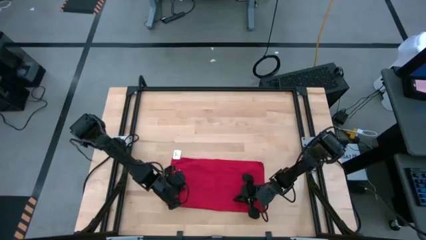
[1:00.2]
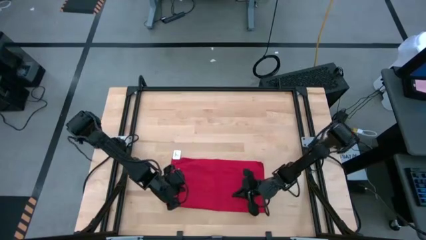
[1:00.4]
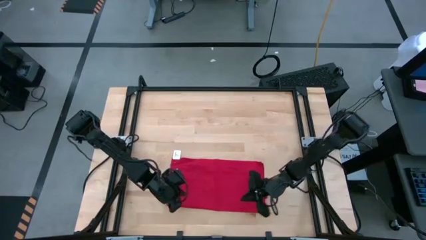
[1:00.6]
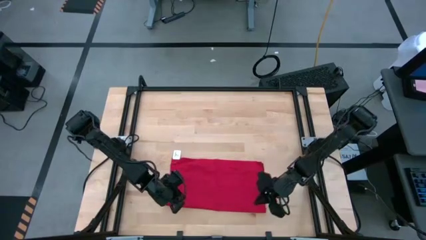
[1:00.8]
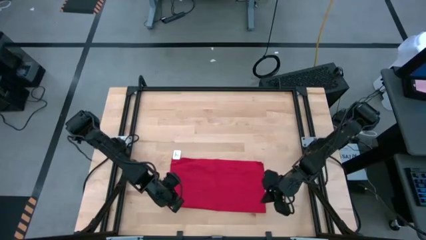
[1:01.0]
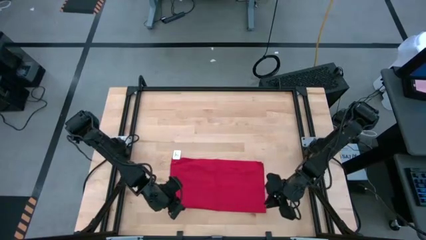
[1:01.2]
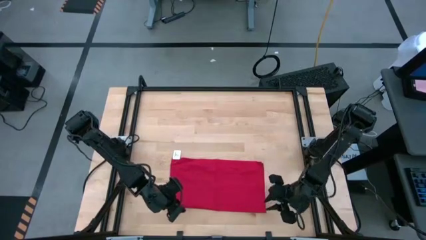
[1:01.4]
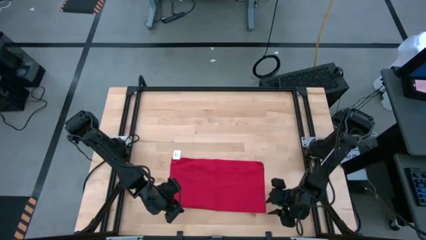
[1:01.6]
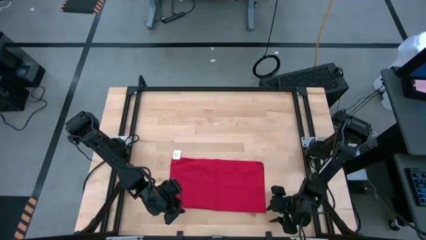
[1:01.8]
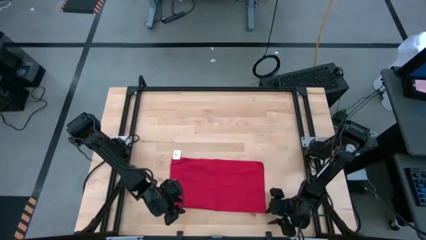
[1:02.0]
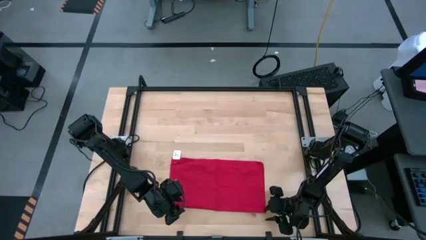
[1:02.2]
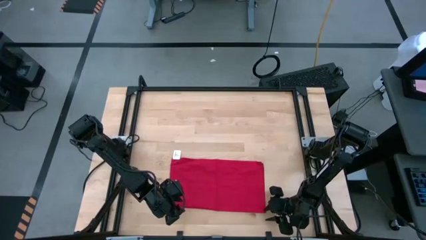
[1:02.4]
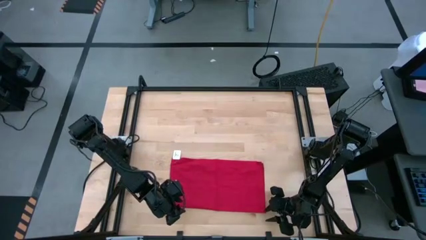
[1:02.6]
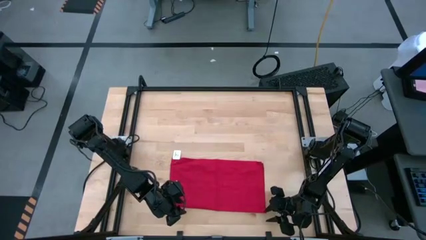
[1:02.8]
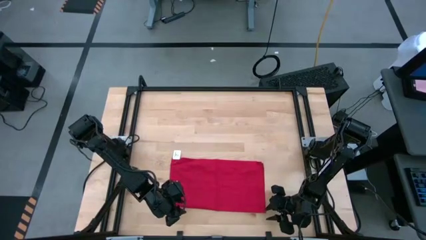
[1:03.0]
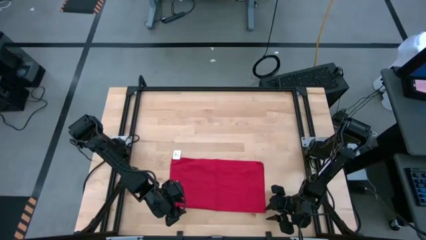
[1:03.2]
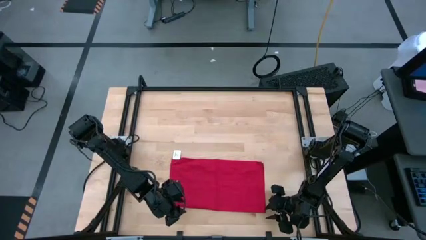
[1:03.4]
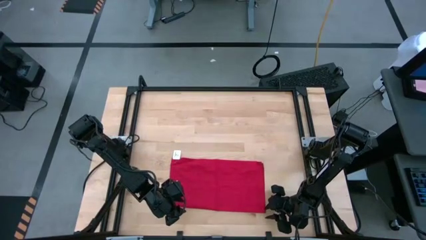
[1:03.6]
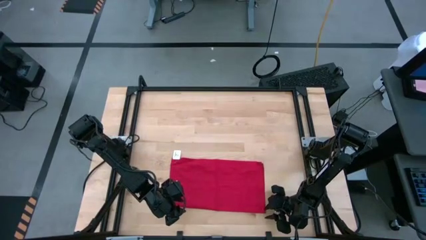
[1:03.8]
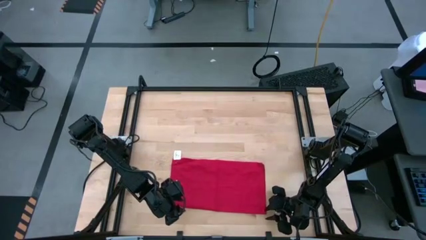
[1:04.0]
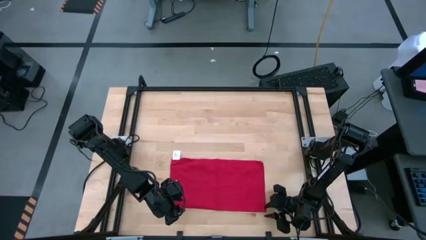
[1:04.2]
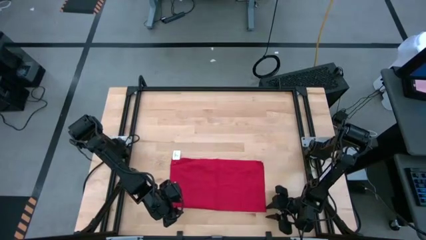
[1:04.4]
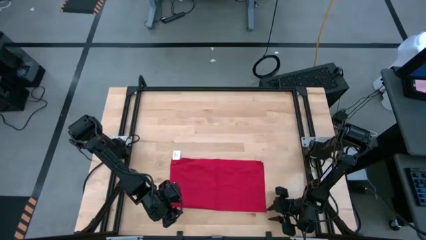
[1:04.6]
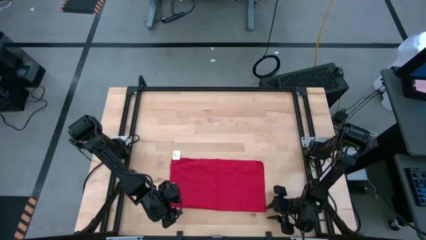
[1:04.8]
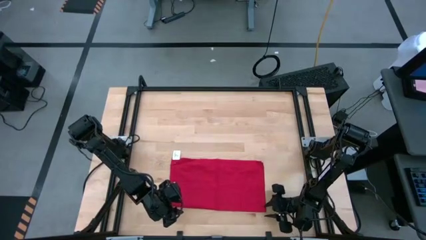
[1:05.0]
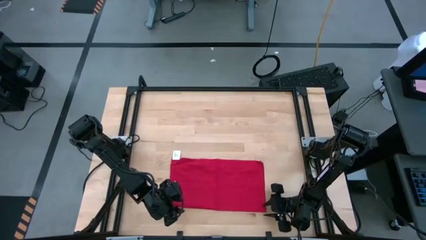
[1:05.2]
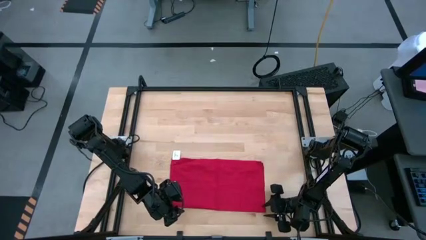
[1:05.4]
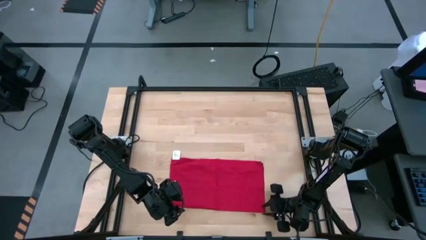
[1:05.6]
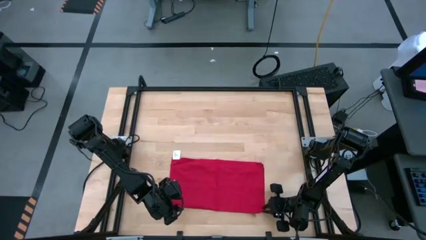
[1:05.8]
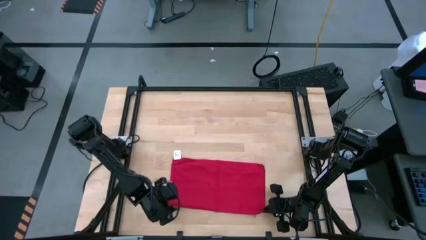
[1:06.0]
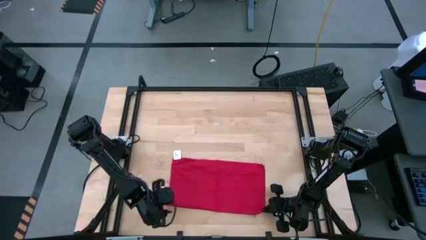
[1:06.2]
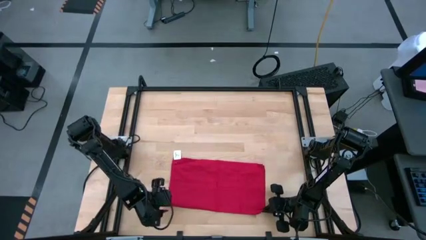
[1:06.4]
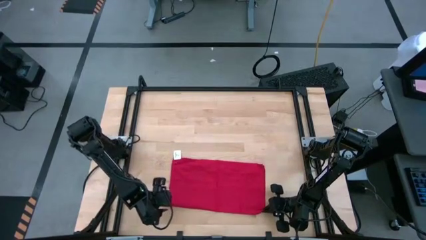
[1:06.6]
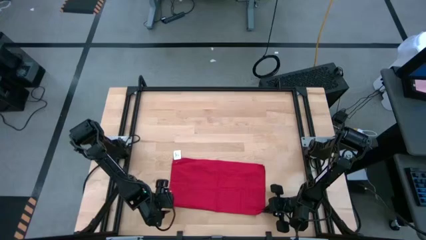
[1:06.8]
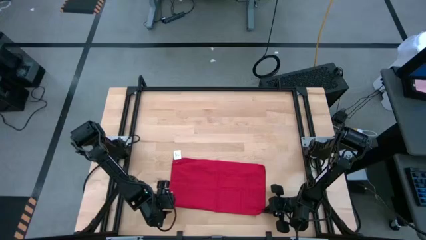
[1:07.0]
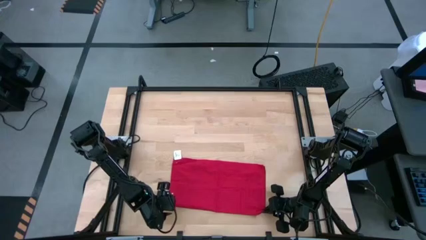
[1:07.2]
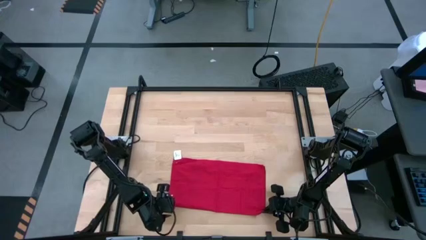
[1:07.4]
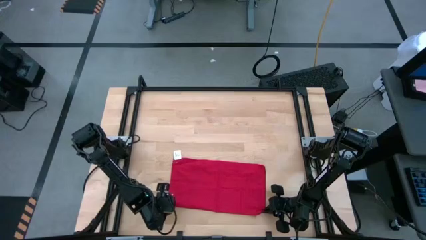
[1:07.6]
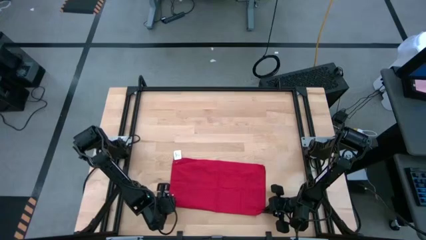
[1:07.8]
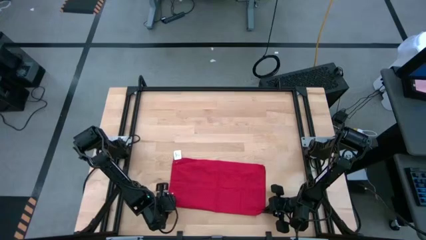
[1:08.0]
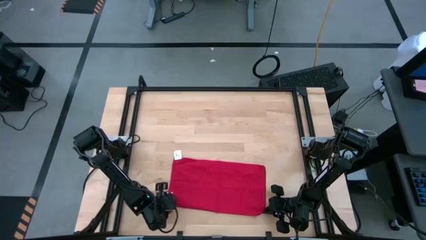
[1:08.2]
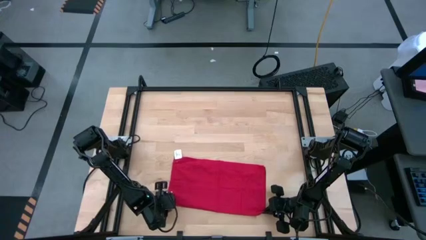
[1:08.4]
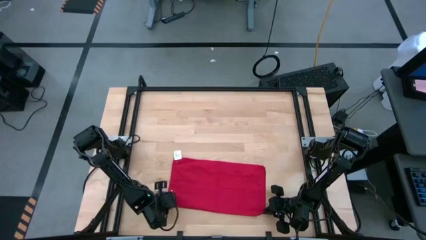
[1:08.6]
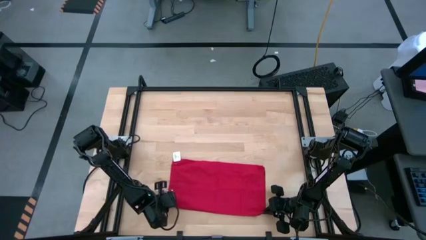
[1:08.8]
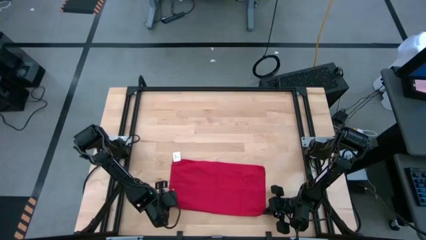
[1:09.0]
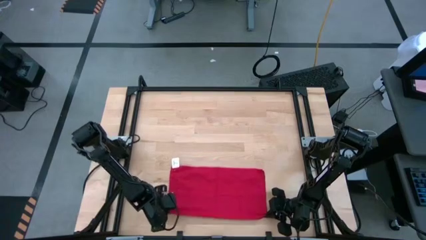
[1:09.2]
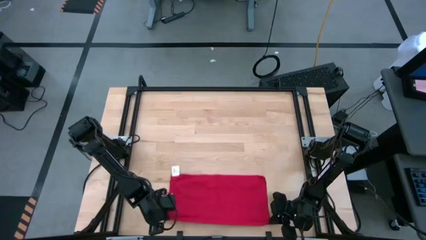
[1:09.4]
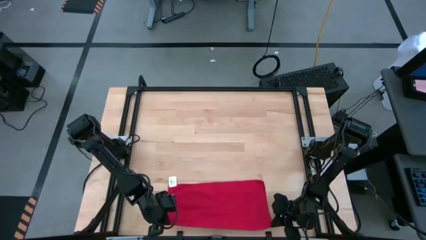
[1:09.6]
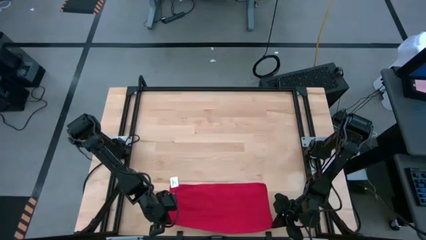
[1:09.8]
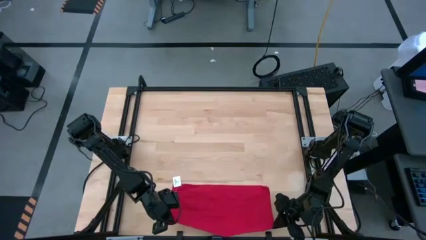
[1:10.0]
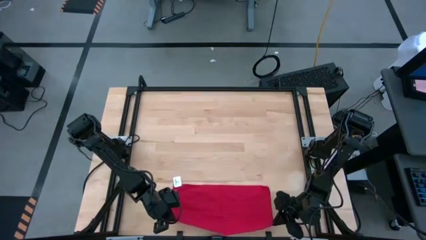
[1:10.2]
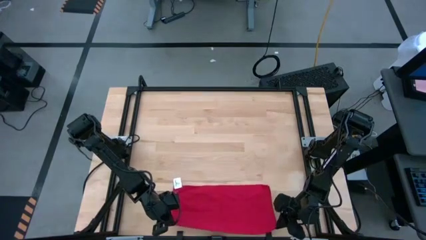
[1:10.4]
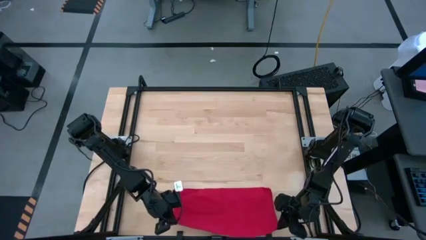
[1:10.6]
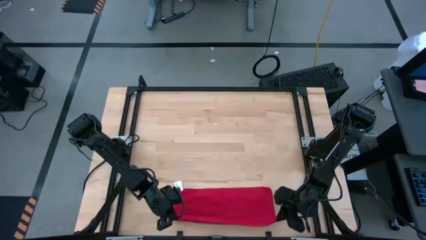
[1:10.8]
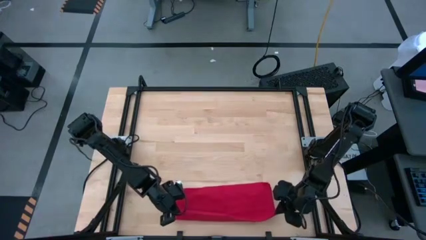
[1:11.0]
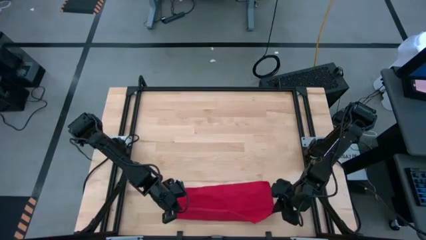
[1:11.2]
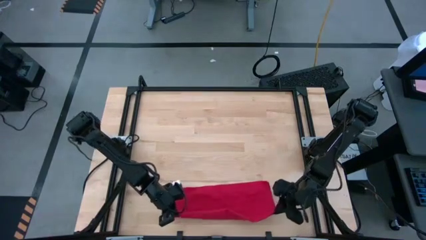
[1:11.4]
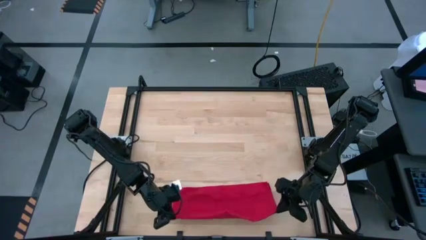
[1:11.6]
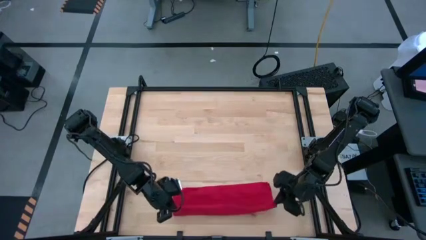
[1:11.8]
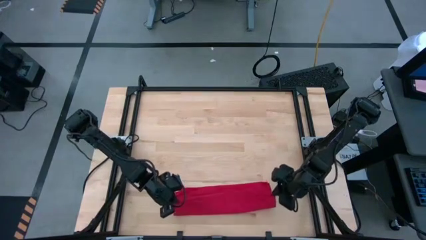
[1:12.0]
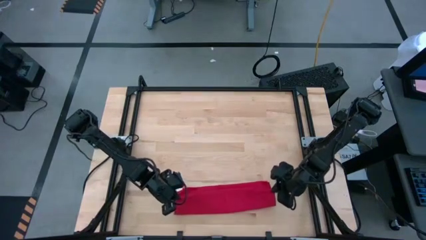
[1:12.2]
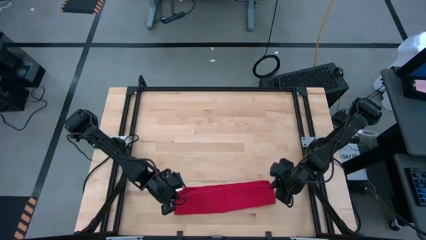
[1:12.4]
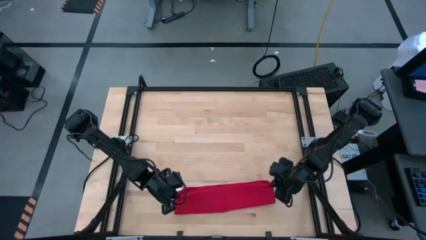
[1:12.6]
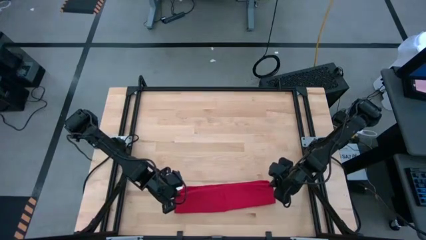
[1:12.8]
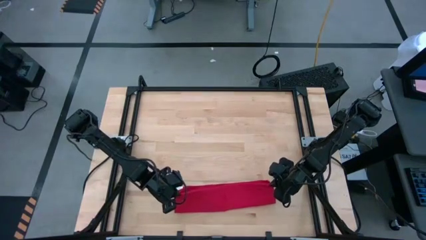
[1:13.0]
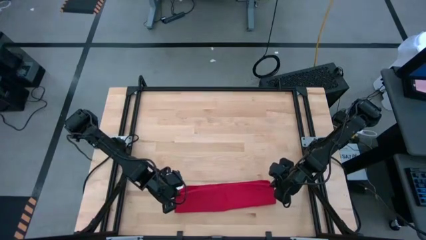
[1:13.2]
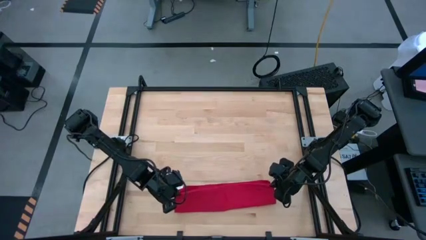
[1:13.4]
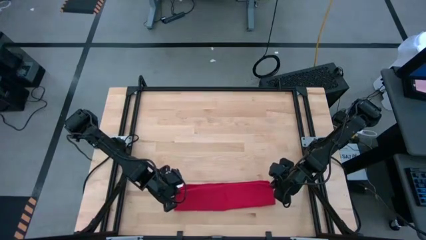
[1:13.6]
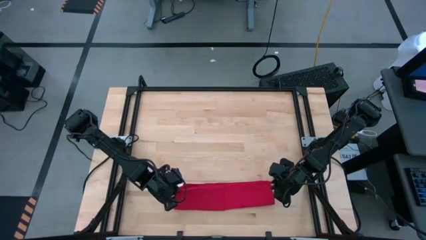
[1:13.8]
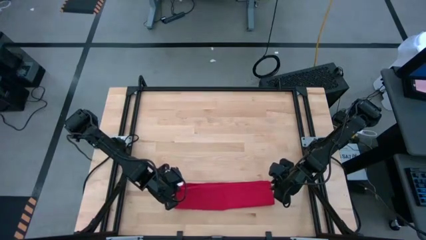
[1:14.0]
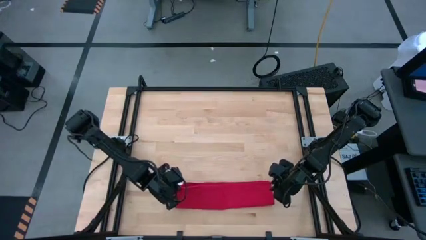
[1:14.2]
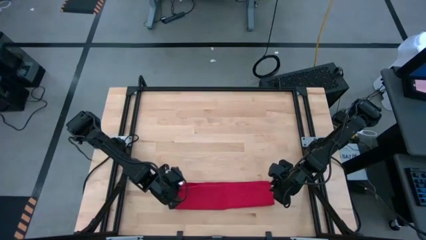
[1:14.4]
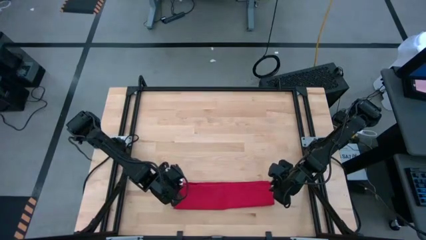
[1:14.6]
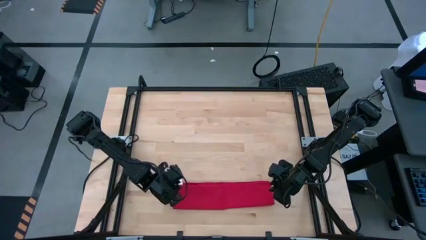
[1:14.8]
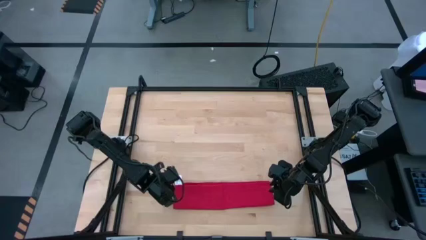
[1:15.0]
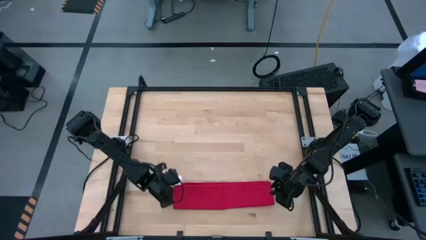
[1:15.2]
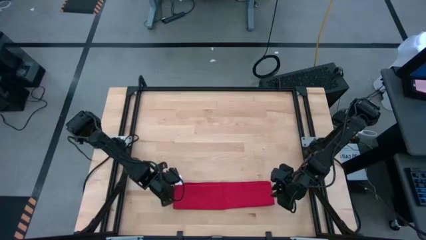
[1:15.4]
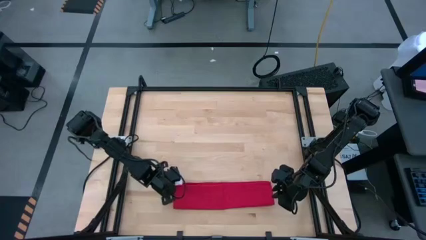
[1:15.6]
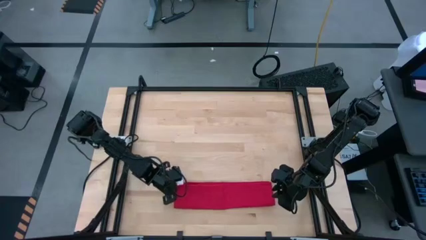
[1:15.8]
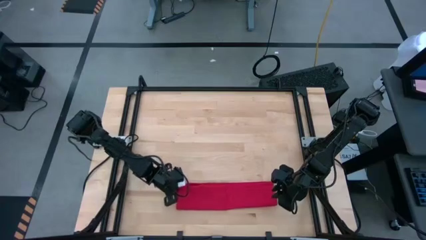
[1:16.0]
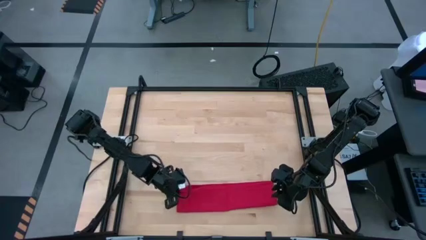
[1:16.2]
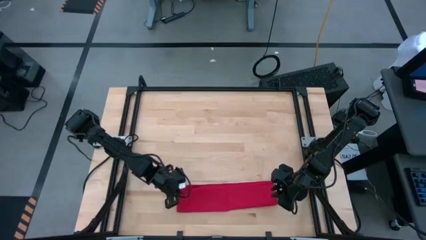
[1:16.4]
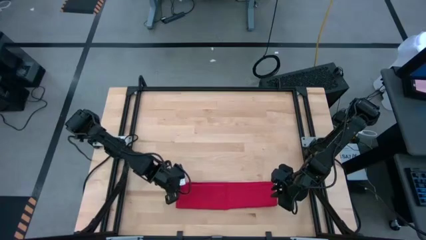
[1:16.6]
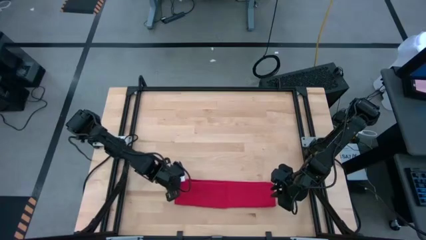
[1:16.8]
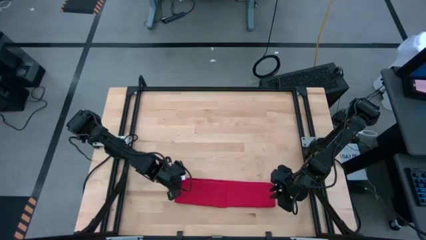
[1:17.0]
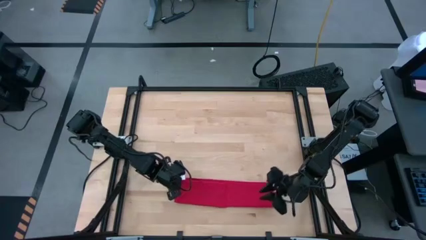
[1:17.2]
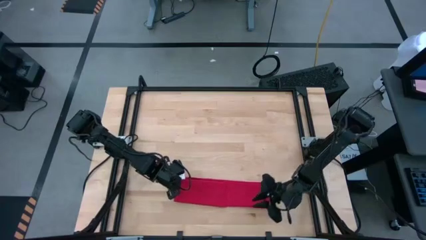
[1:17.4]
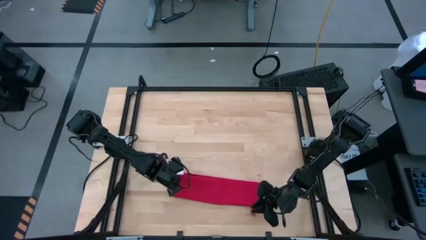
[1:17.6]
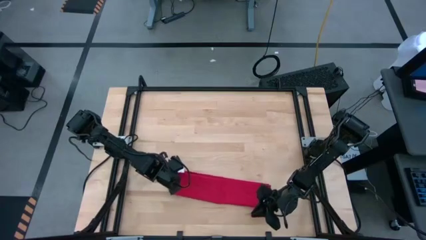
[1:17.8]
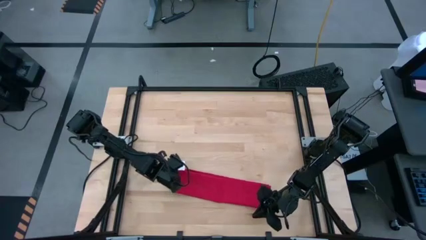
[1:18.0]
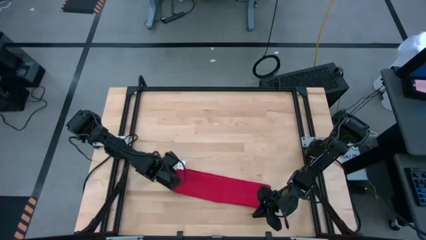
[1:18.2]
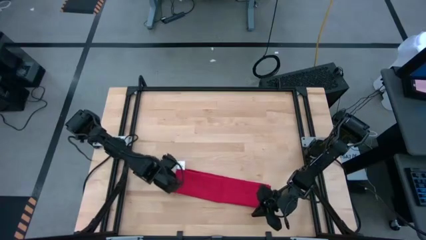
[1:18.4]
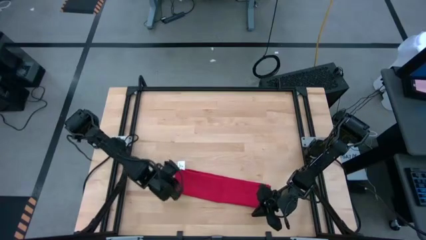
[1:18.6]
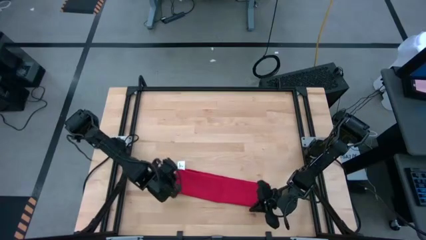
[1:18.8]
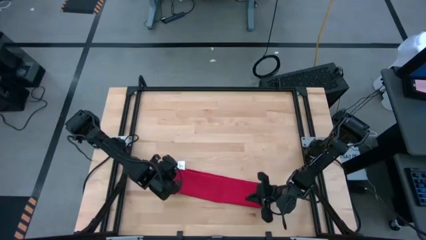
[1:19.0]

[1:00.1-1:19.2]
Task: Roll towel
Roll the red towel
